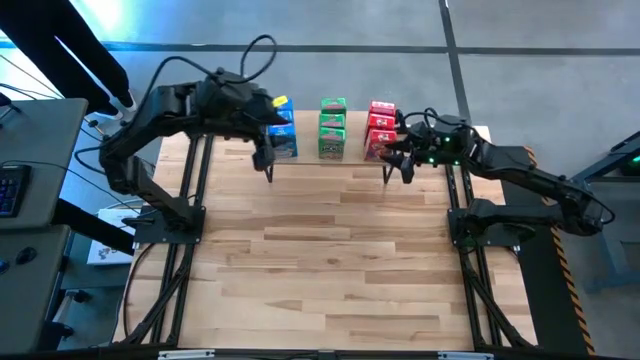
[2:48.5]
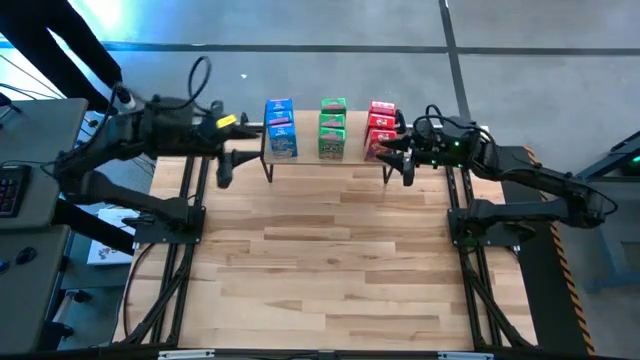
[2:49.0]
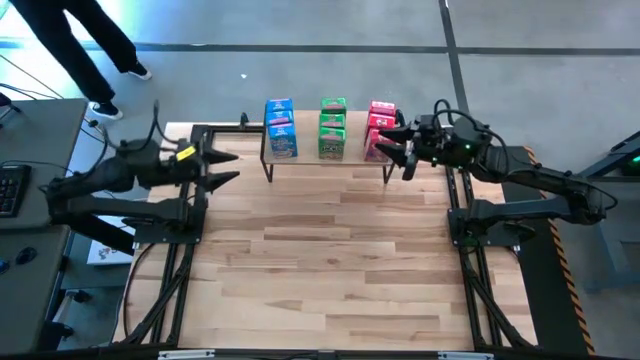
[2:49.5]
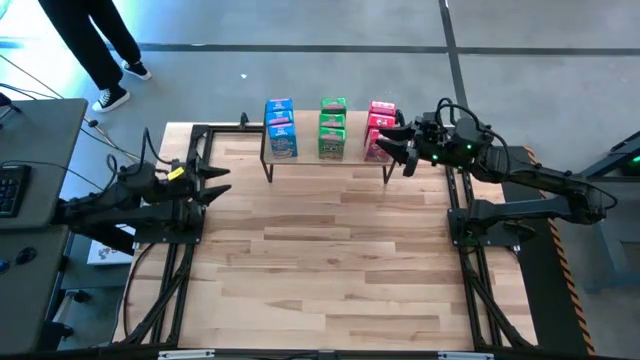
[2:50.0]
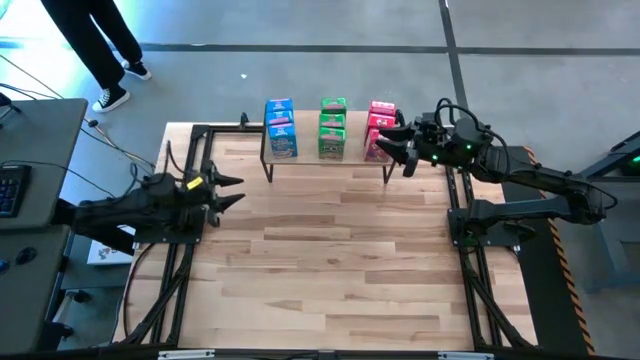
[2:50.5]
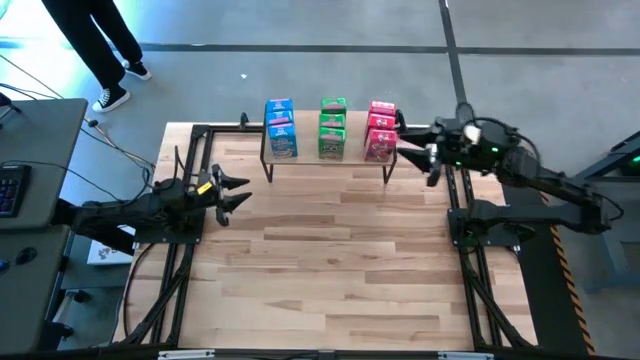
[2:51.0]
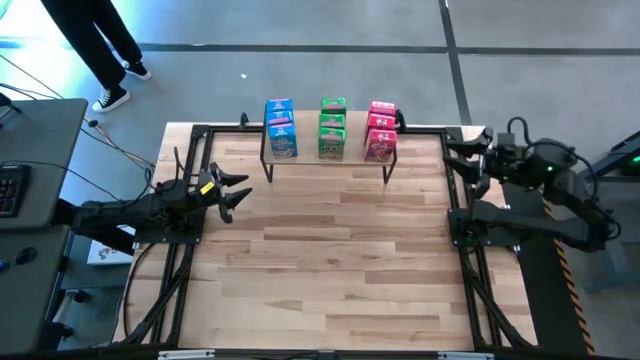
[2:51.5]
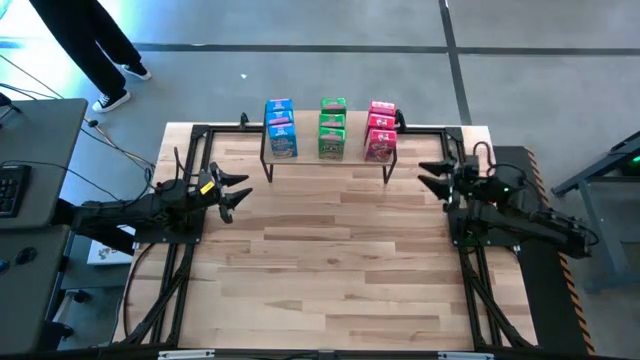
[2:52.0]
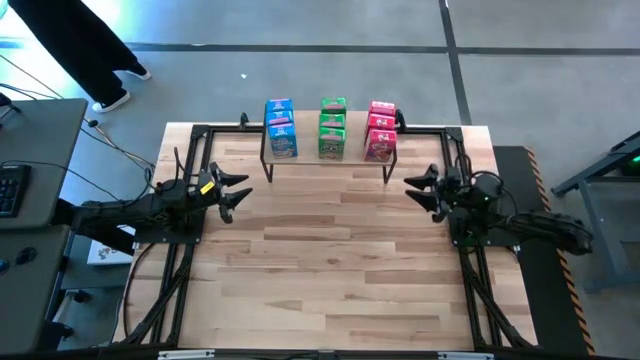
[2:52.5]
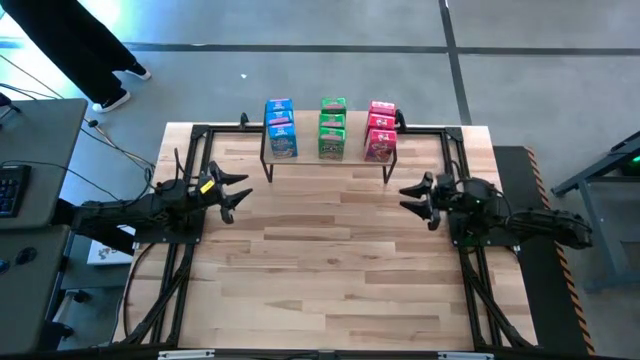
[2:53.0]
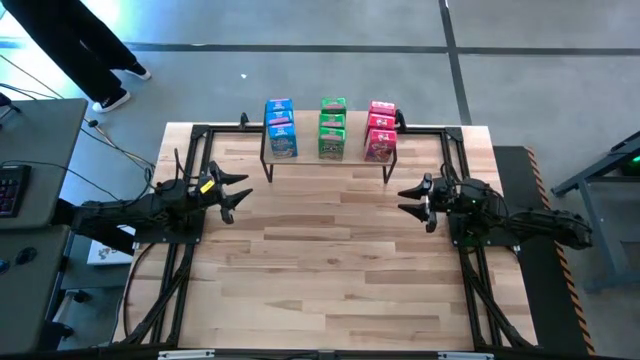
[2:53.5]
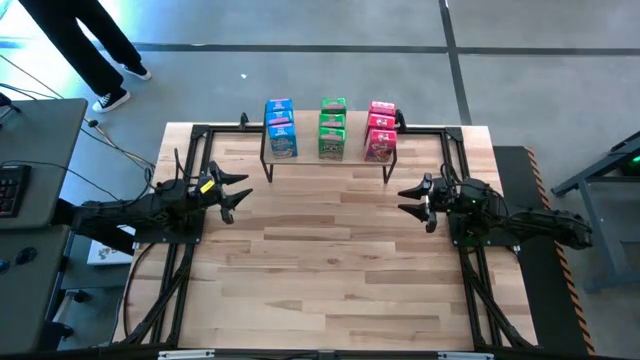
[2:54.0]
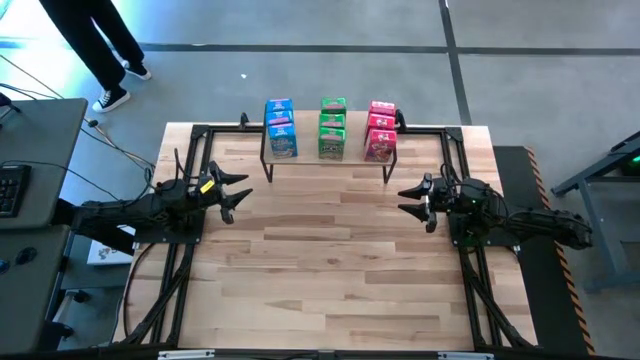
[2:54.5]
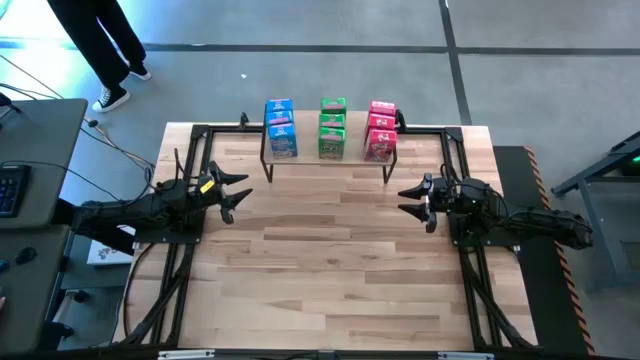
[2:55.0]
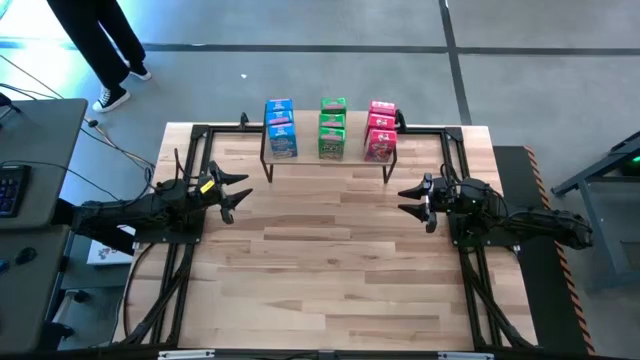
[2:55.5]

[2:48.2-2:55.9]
Task: Stack cereal on shelf
Return to Home Position

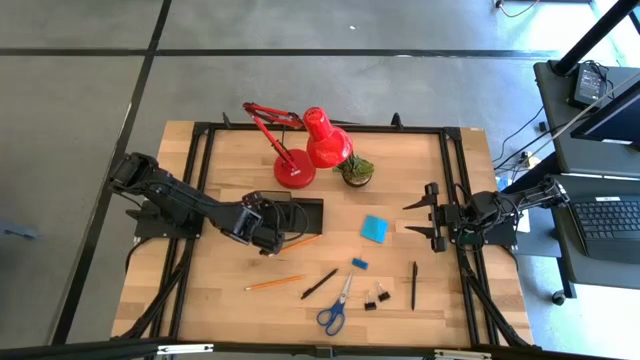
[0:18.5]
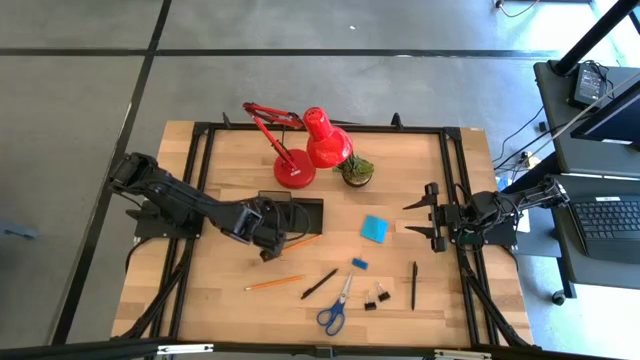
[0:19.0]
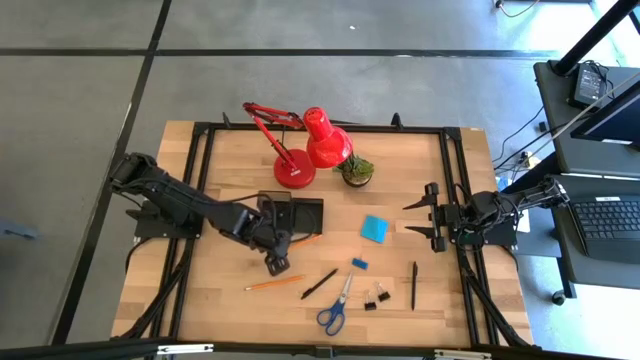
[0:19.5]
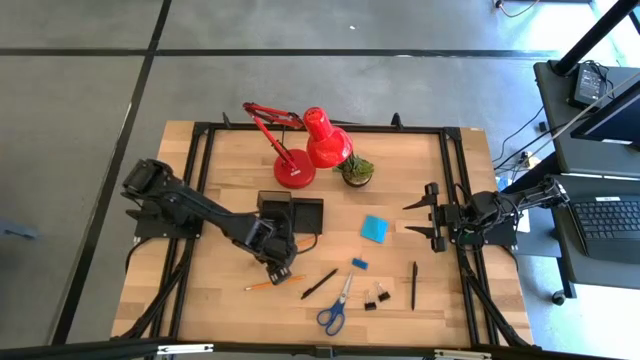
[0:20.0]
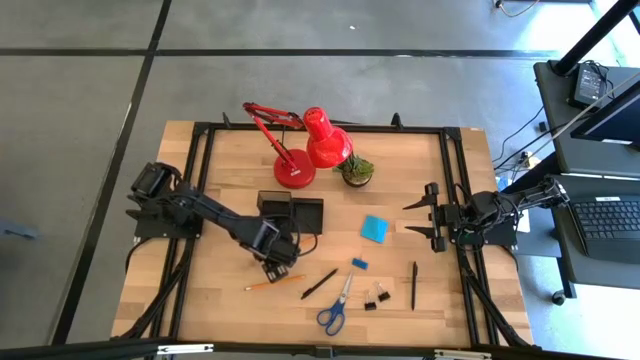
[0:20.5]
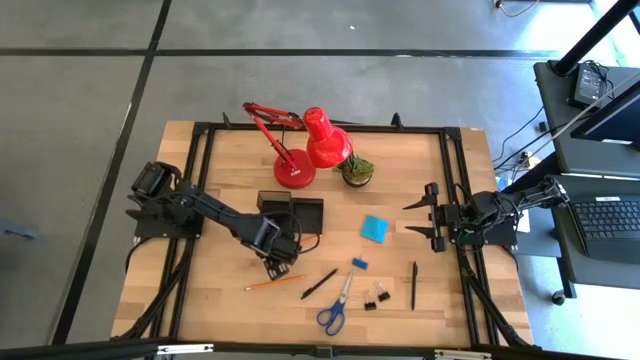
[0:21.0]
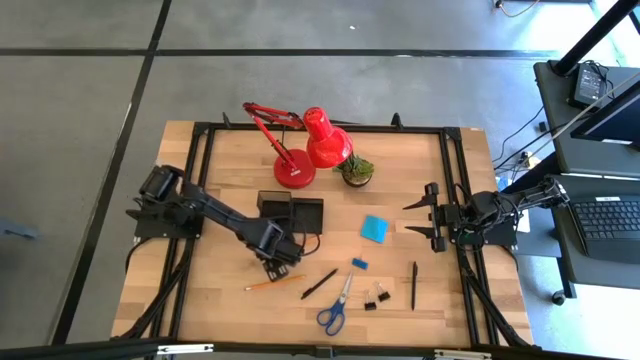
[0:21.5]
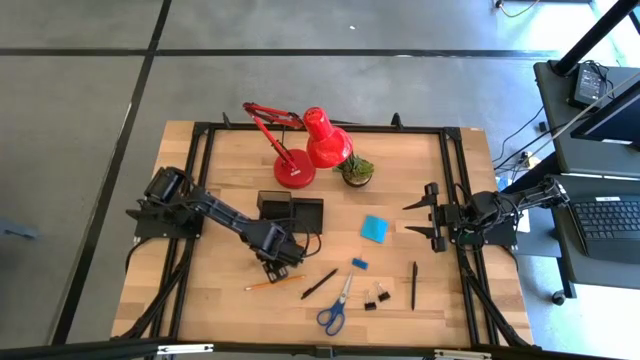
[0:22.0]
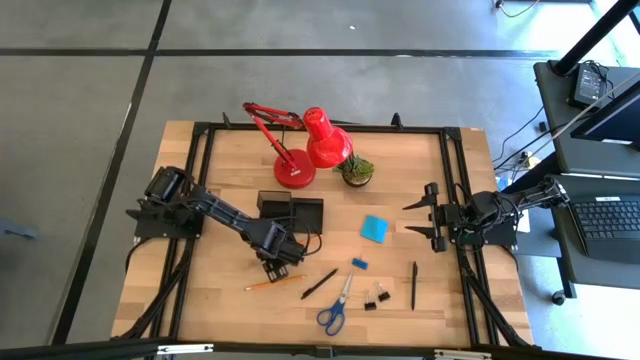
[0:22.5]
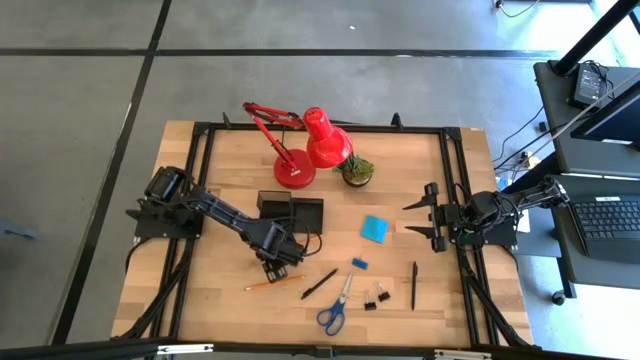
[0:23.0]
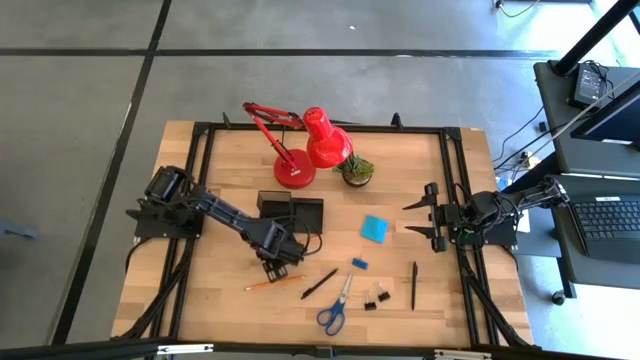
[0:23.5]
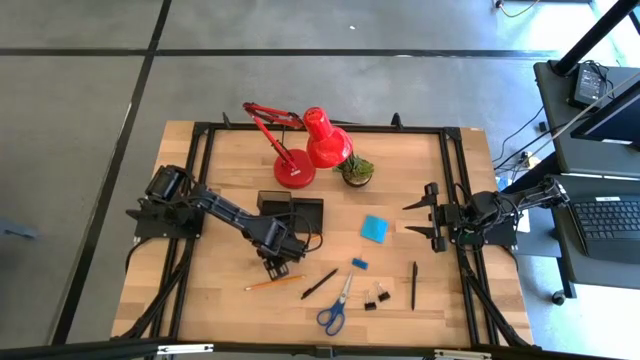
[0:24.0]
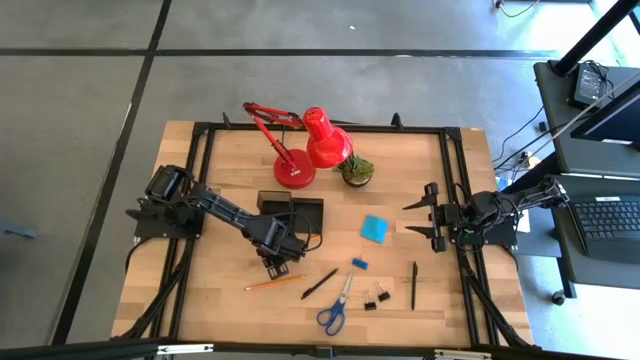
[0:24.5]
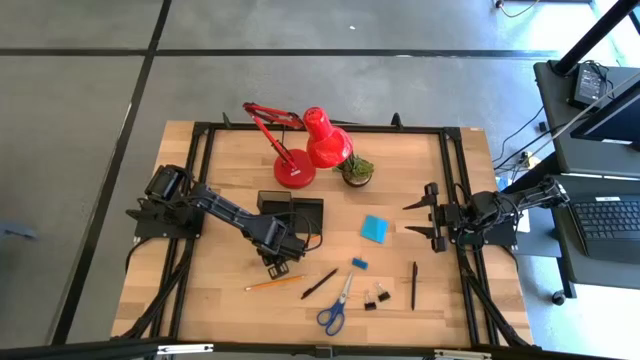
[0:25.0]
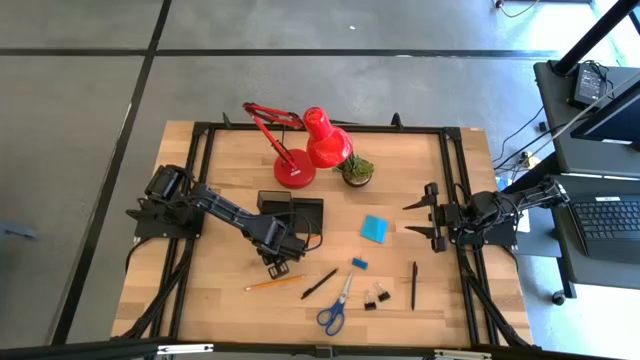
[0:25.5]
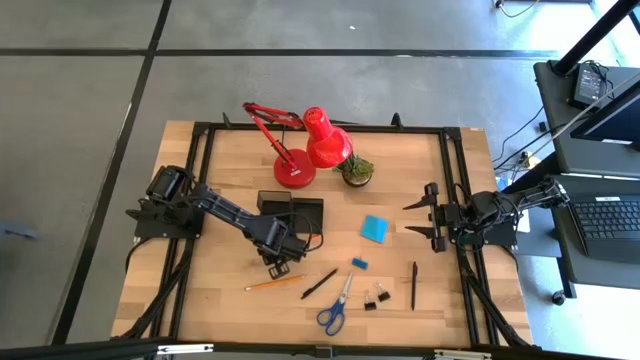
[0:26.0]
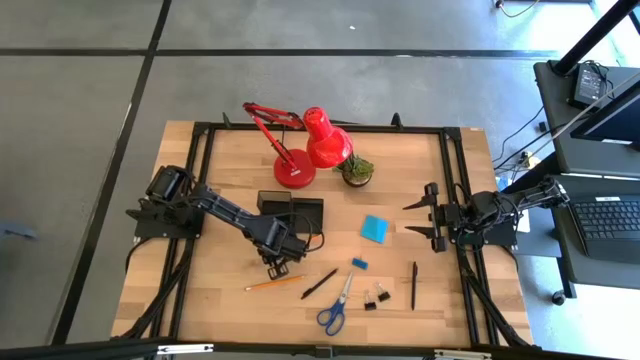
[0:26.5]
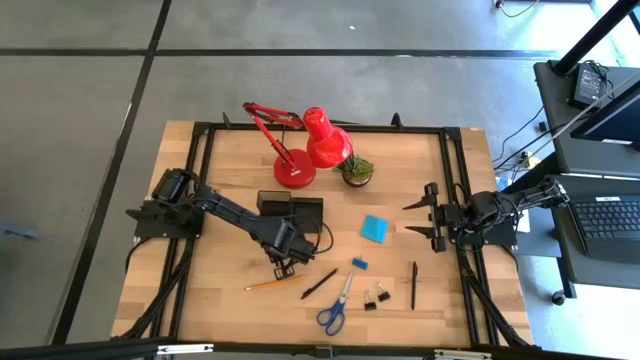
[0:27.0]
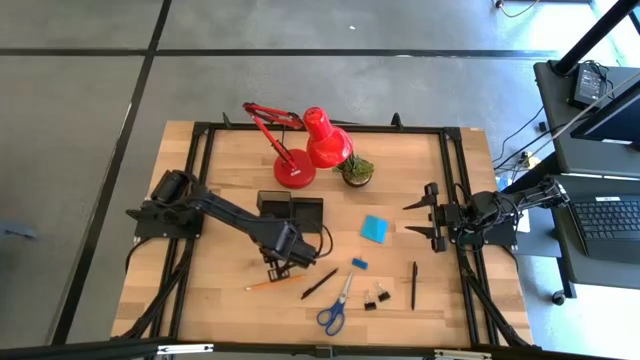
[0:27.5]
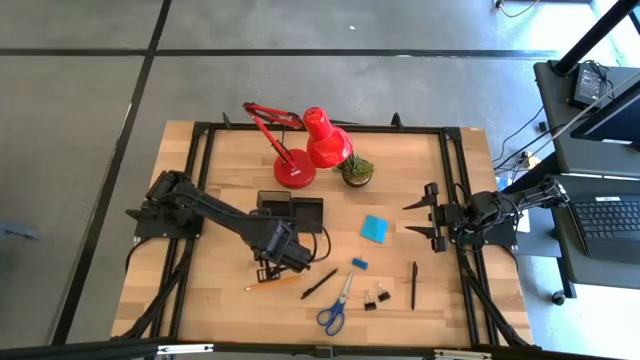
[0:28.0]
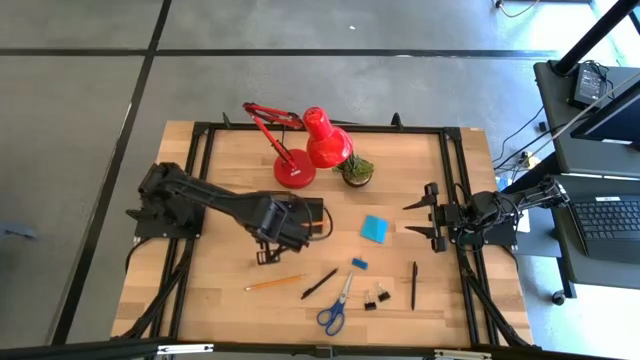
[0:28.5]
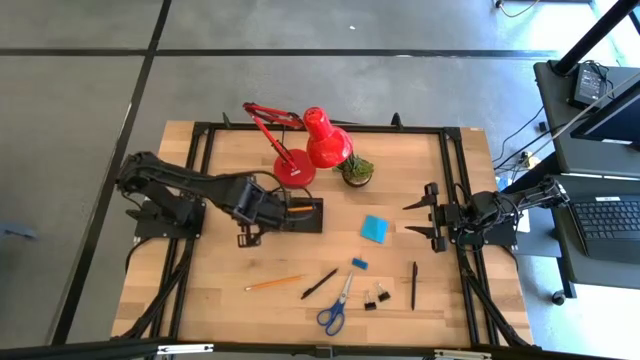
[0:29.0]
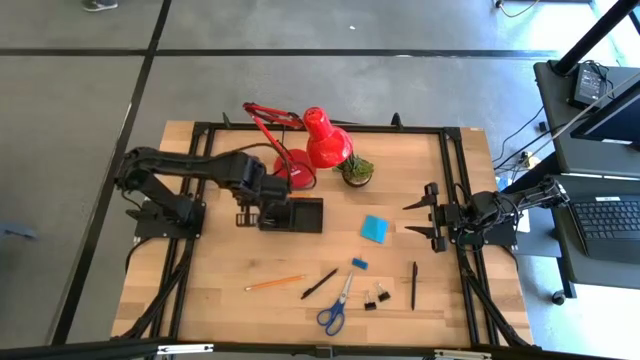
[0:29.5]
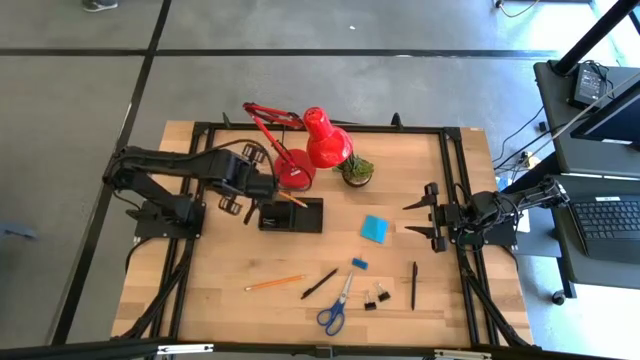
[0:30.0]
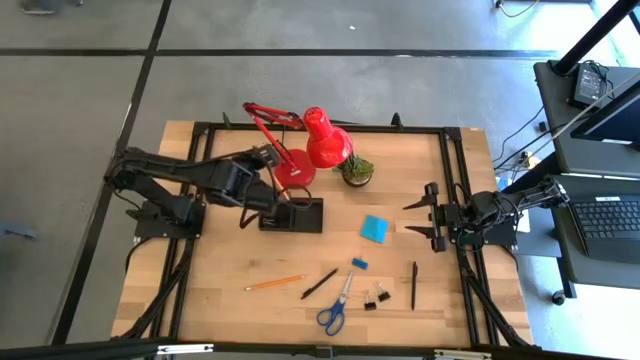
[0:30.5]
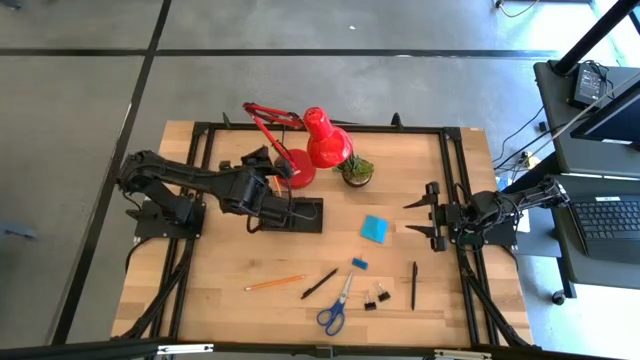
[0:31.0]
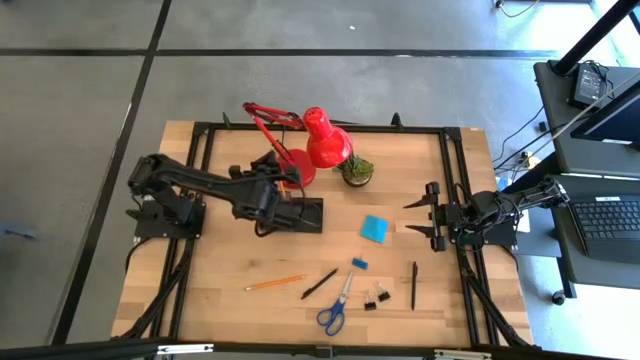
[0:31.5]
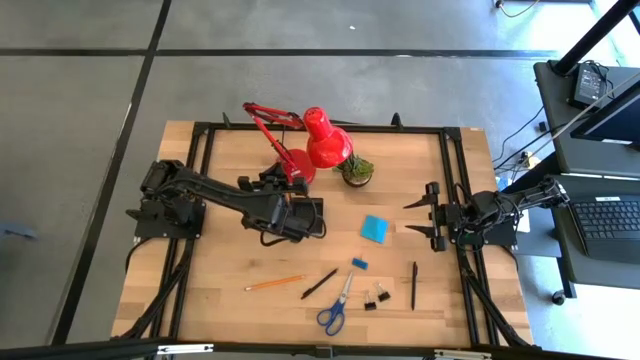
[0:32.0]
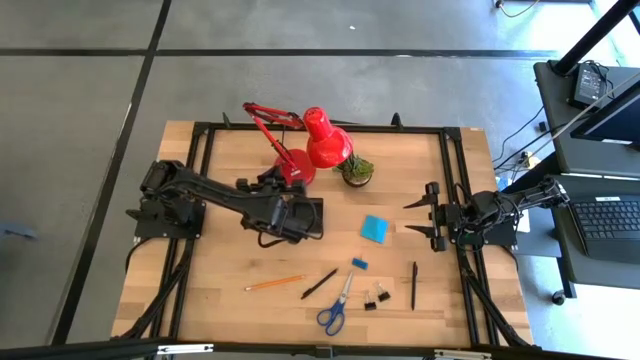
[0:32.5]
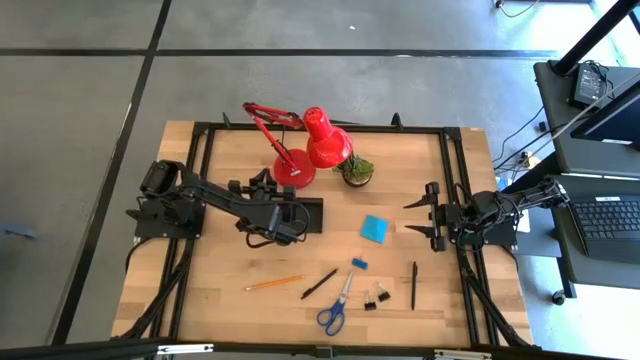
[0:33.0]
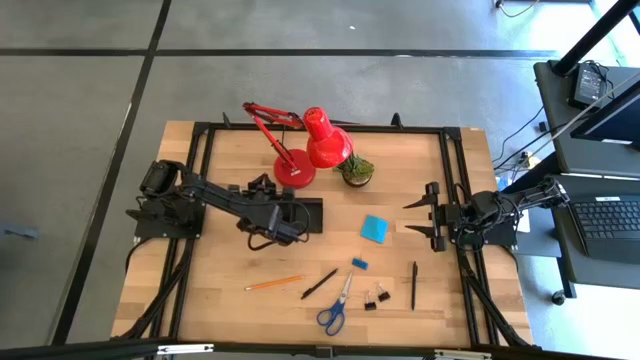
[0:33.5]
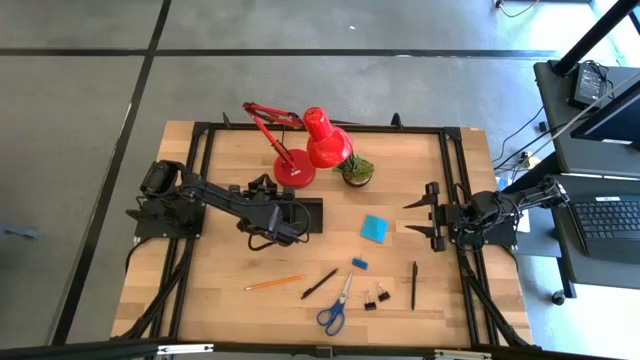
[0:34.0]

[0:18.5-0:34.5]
Task: Pick and place office supplies into organizer
Put the top orange pencil into the black desk organizer
